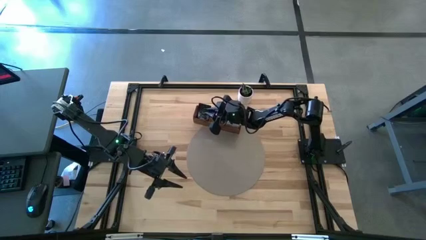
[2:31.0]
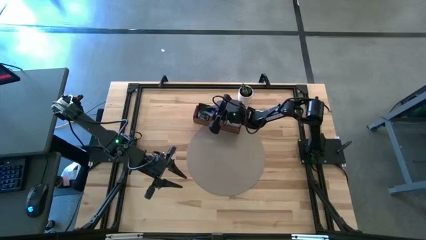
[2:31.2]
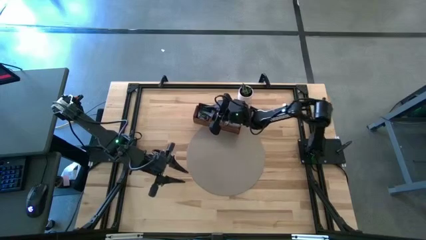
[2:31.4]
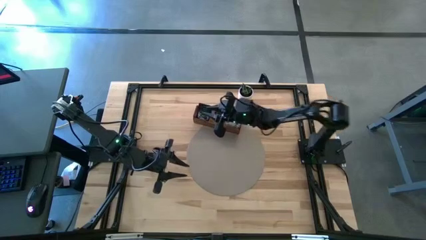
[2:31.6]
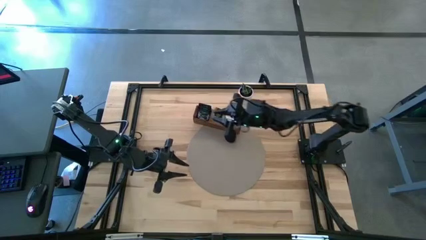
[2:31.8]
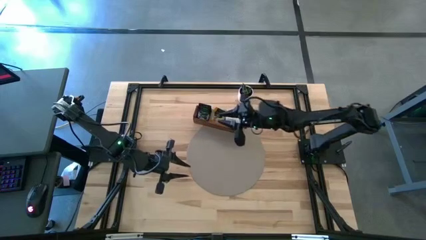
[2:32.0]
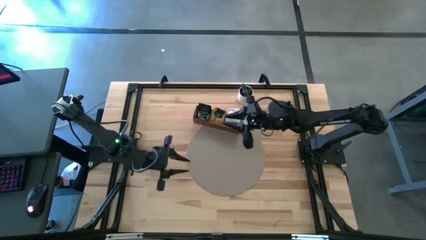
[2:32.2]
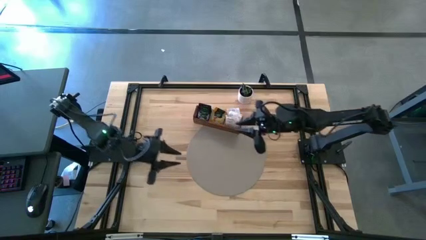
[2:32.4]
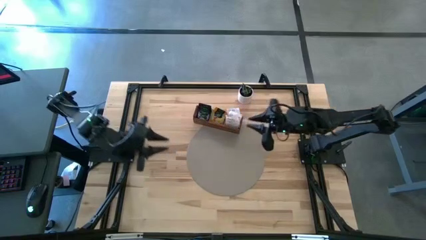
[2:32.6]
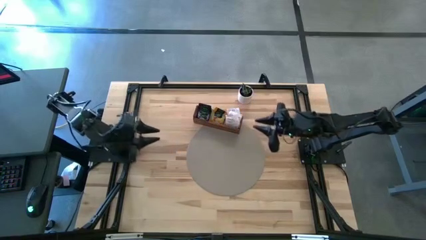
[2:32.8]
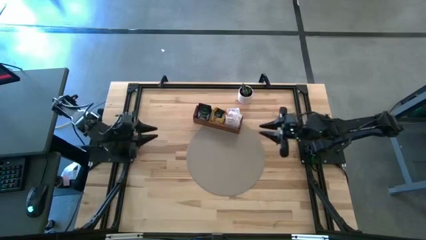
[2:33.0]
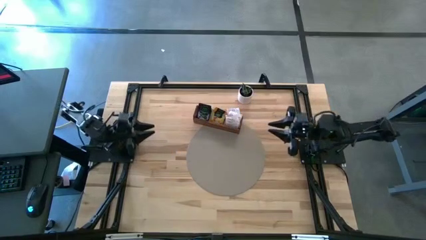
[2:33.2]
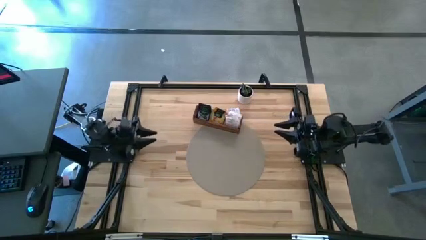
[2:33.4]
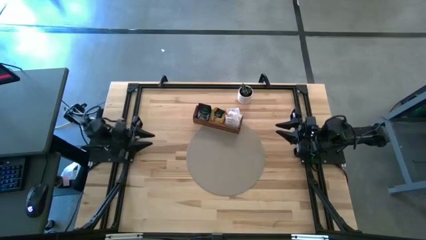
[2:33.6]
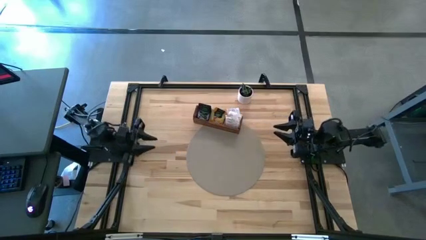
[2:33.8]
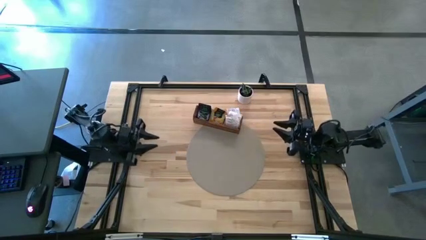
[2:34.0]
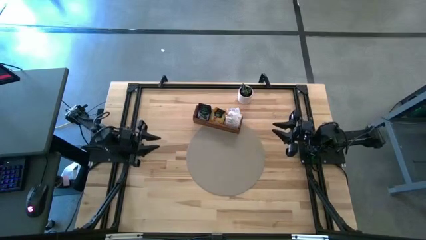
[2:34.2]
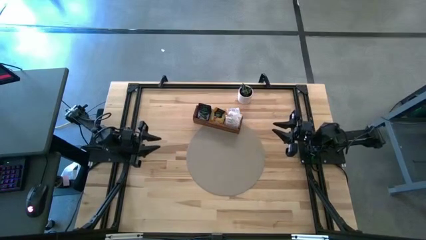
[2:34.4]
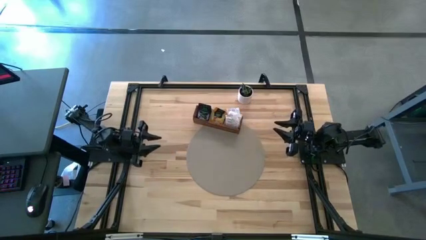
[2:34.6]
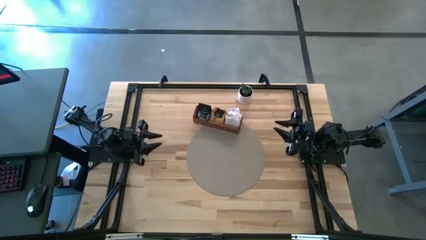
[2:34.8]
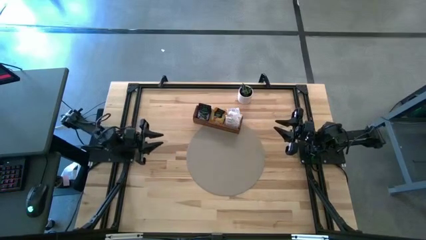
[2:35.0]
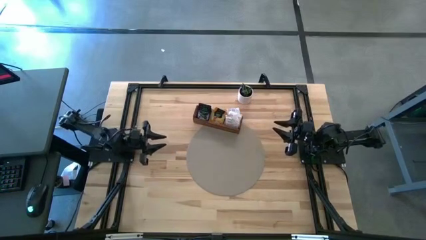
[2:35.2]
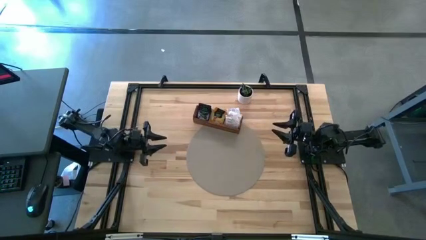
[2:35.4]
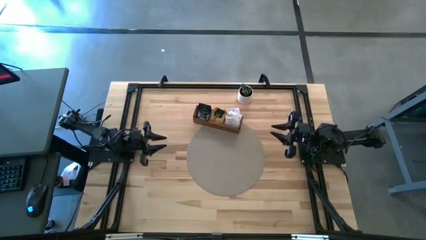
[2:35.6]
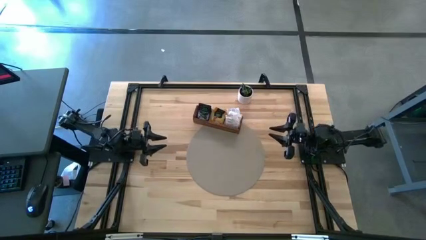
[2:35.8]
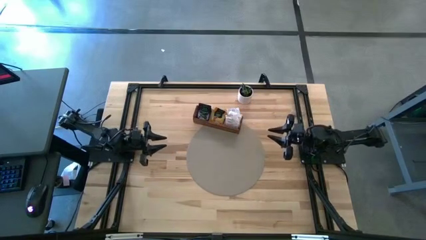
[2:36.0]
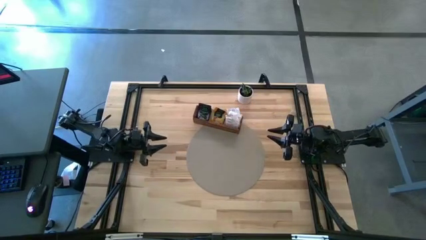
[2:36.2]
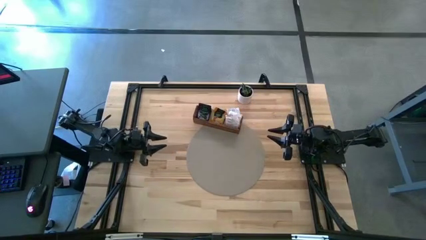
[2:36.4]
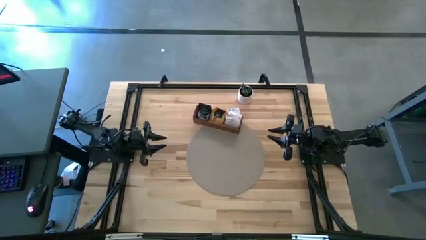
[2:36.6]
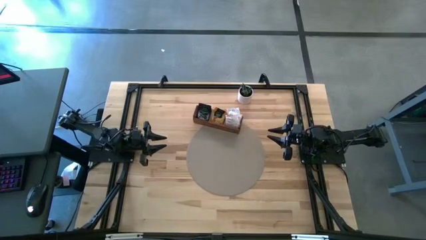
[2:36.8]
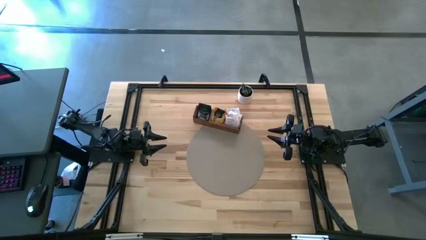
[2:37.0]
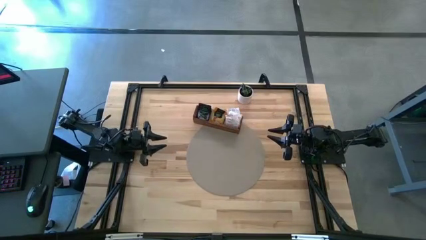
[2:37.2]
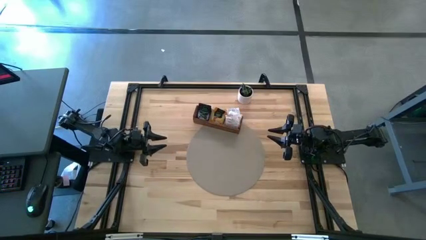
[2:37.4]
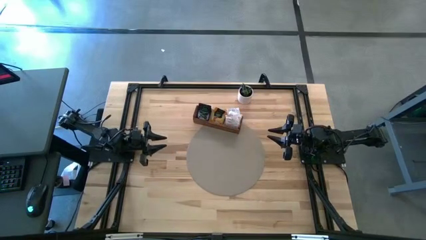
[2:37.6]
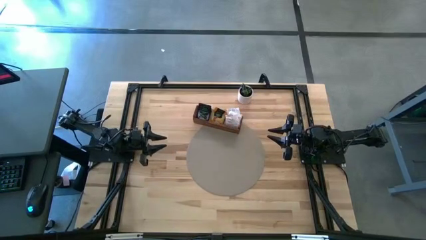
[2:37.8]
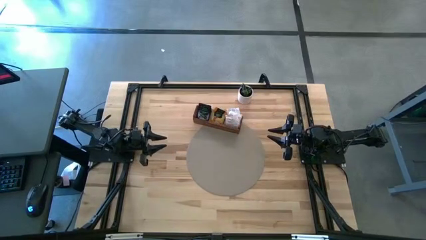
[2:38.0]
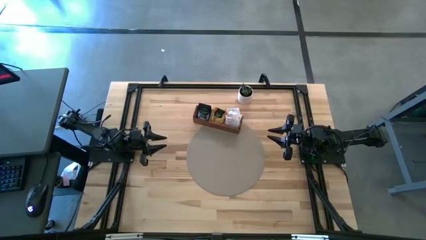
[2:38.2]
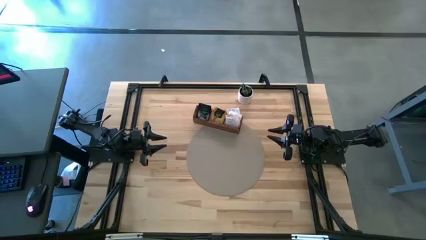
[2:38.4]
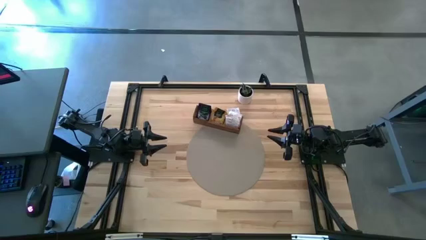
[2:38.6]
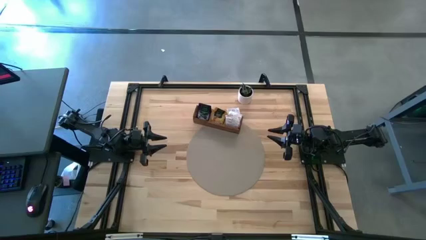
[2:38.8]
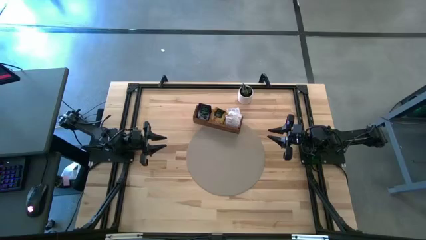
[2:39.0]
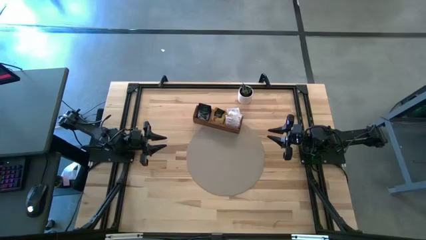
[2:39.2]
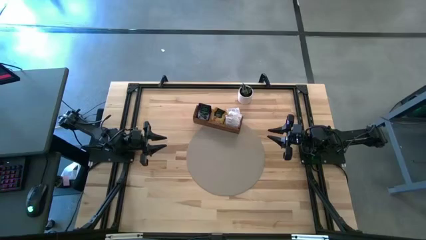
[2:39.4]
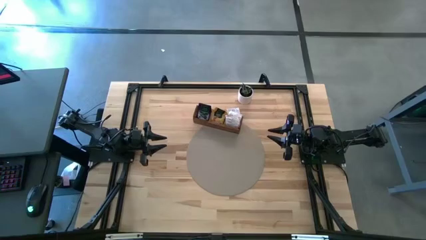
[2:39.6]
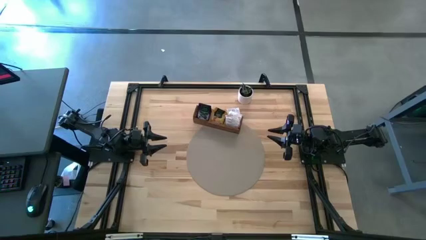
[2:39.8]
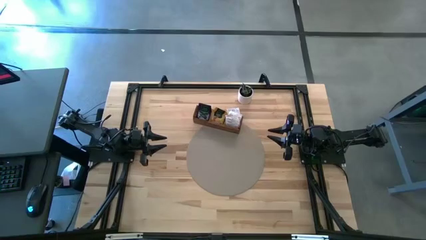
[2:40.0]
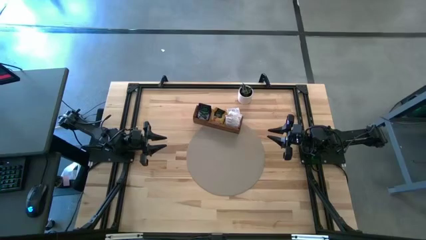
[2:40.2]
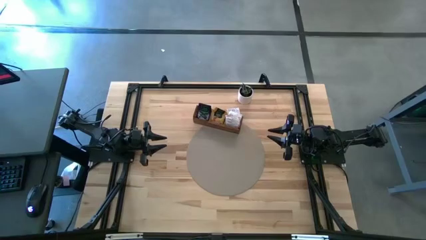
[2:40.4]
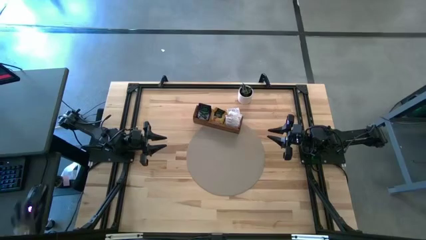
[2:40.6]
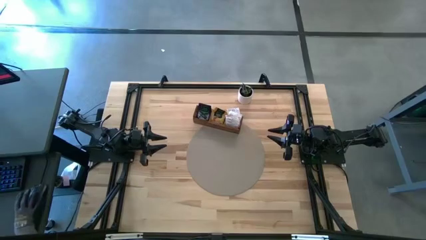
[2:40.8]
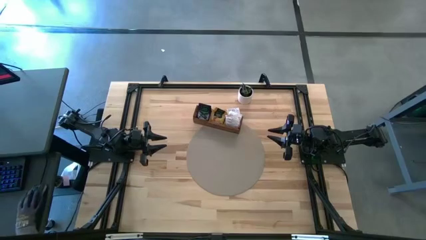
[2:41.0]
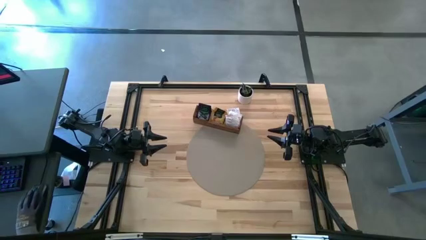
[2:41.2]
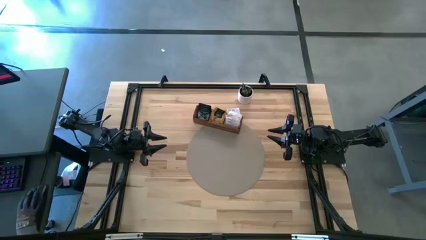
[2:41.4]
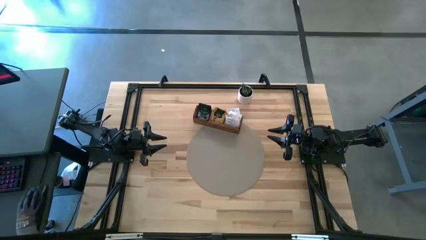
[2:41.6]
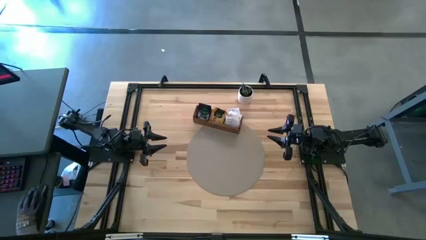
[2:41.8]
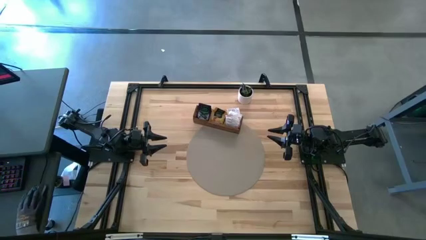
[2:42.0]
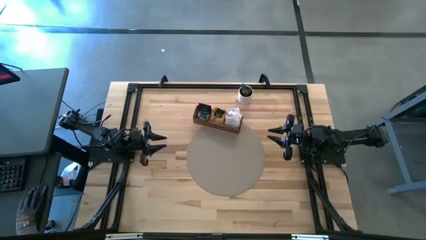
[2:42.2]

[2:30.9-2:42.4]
Task: Pick & Place Tea
Return to Home Position

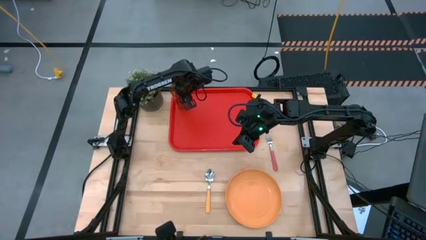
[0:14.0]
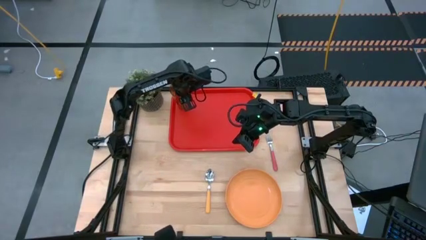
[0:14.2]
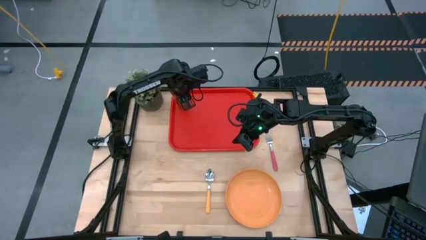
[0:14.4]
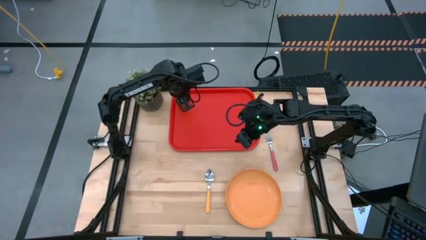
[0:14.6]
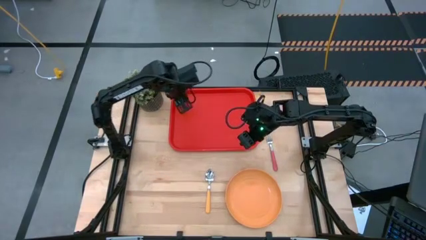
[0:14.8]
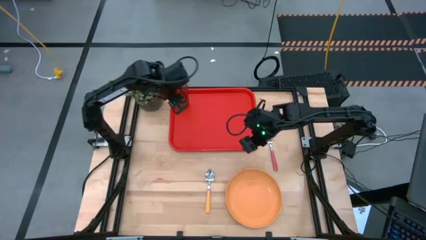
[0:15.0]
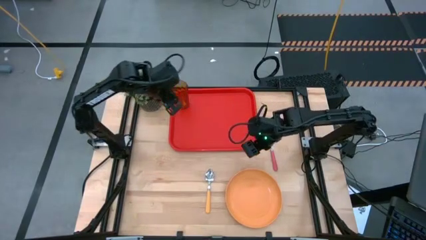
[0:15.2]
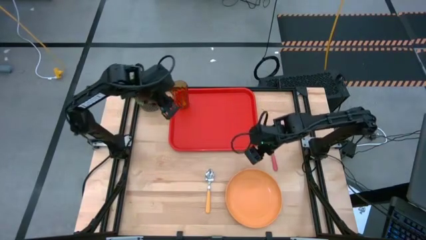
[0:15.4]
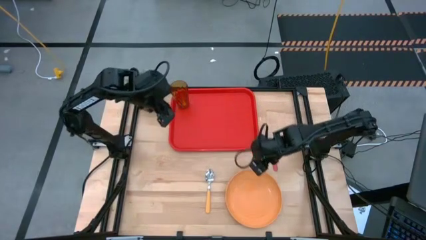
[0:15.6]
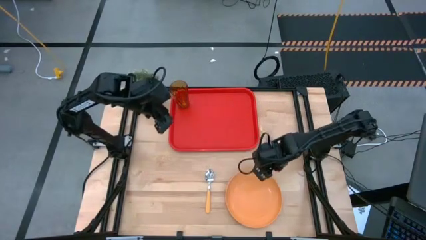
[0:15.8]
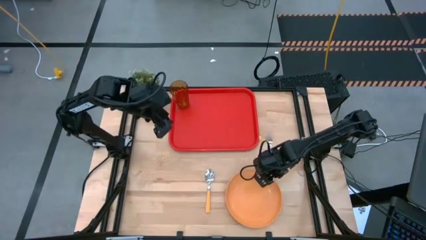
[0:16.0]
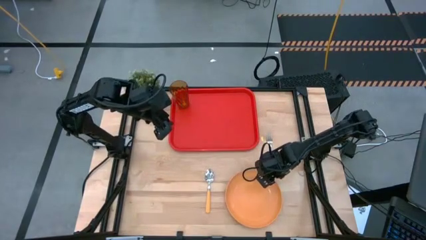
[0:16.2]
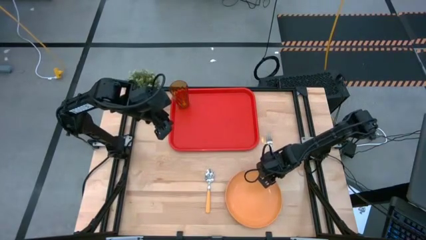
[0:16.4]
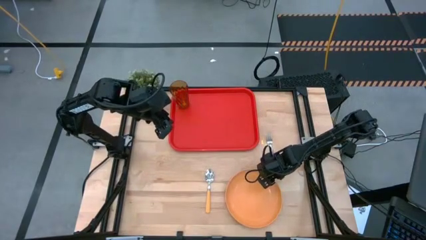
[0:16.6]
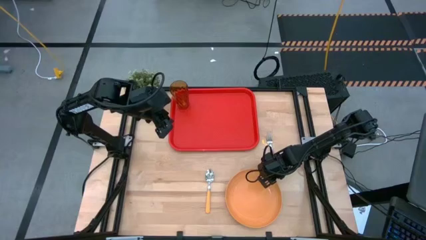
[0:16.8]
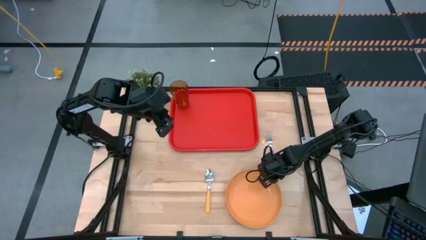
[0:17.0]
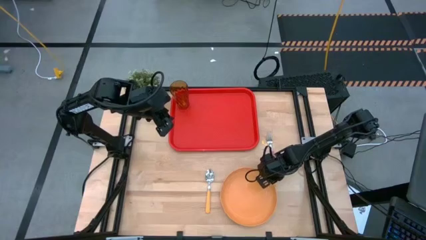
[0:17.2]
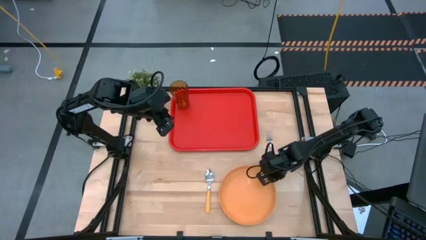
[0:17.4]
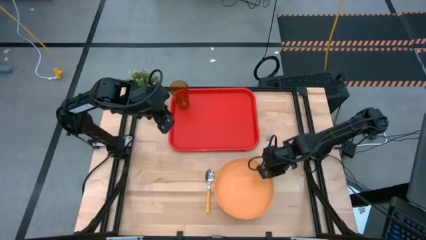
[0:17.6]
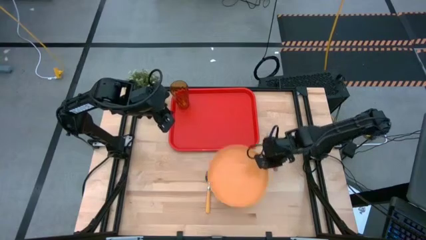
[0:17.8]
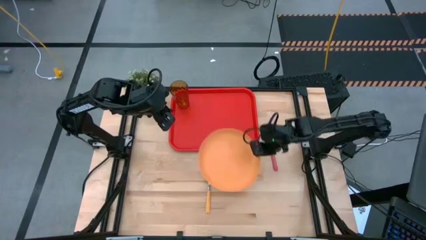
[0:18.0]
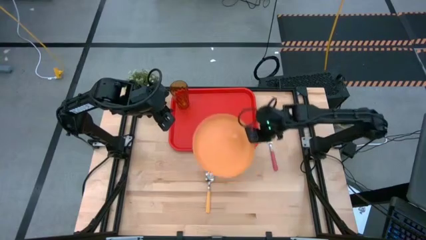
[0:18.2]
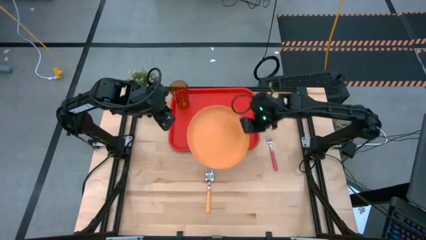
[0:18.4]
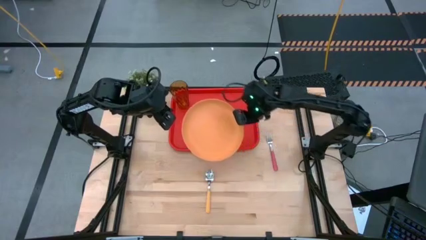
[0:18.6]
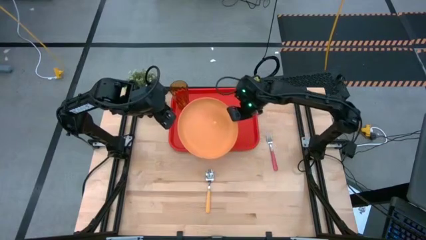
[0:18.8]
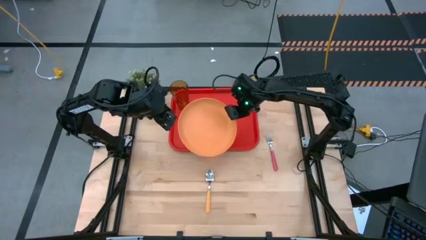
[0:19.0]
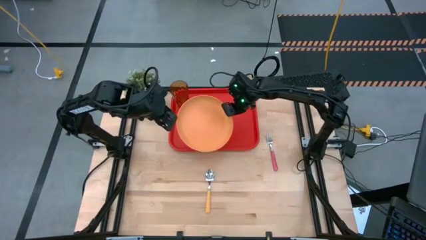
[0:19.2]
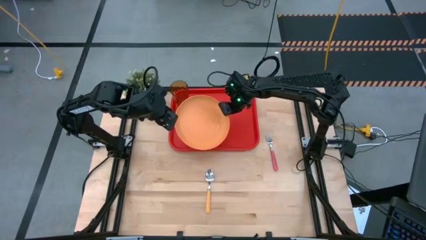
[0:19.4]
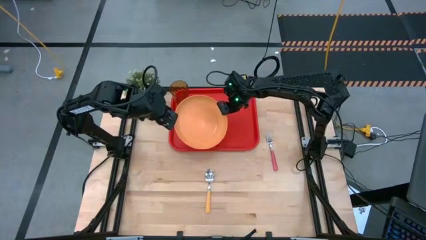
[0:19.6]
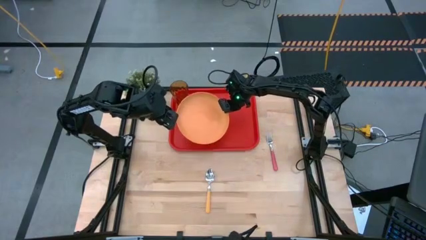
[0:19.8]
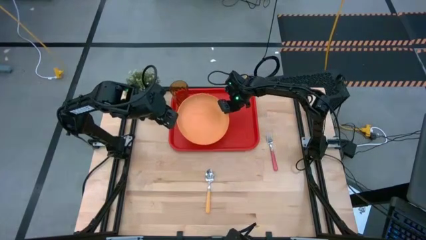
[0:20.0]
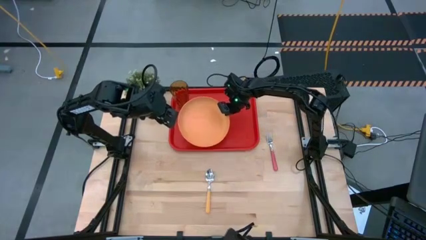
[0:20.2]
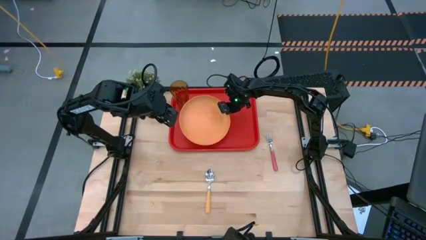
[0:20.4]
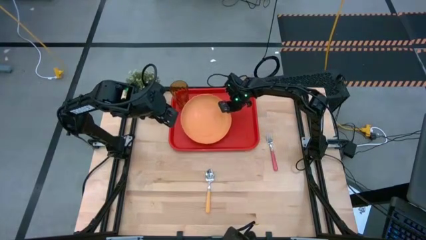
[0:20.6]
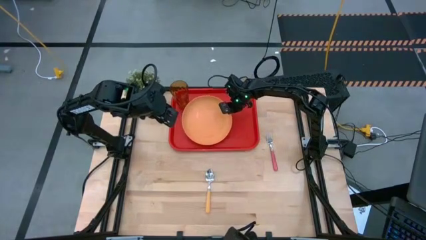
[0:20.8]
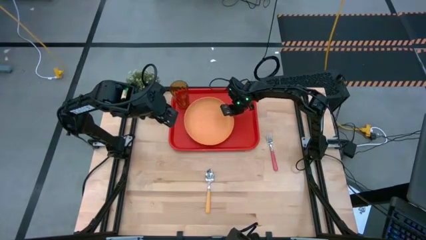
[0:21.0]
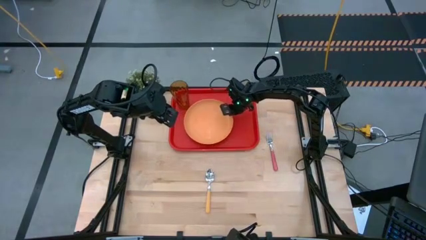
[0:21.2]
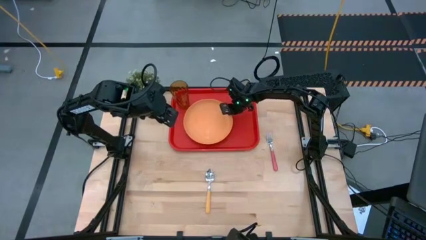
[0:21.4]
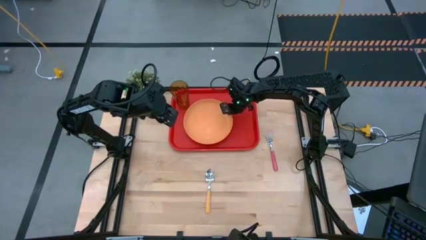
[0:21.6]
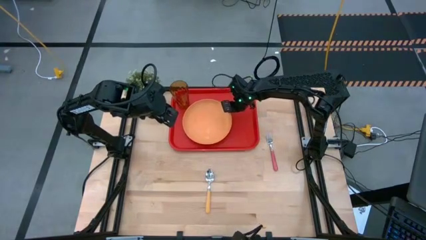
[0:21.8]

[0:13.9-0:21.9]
Task: Pick and place plate/cup/fork/spoon on tray
Put the orange plate on the red tray
